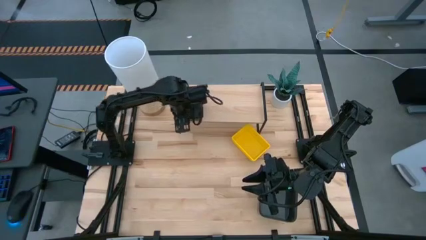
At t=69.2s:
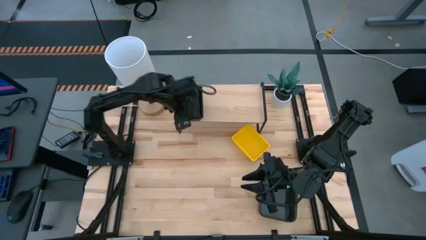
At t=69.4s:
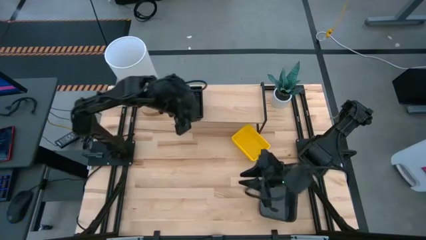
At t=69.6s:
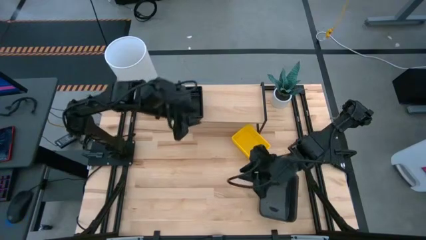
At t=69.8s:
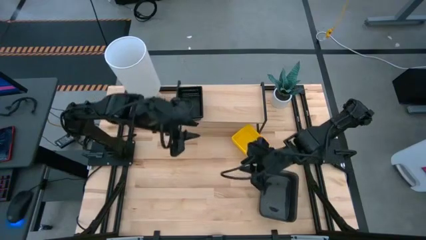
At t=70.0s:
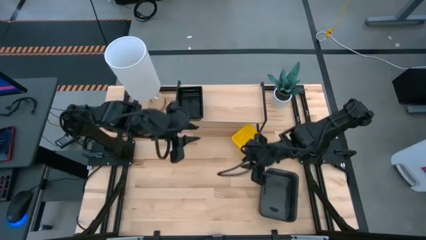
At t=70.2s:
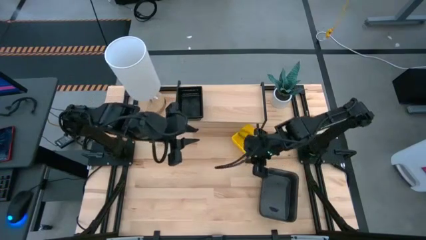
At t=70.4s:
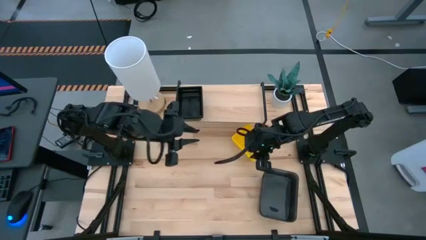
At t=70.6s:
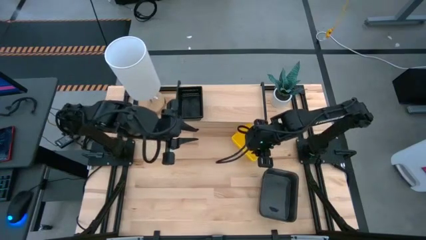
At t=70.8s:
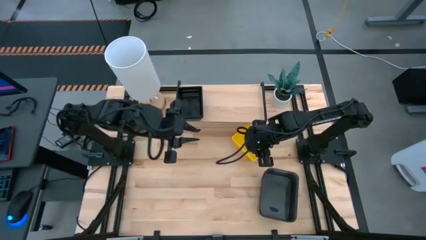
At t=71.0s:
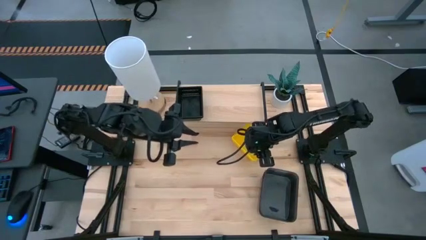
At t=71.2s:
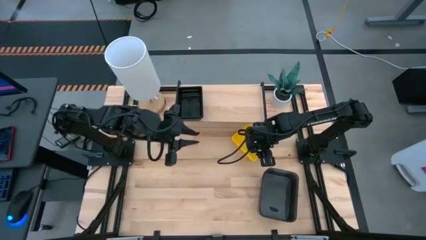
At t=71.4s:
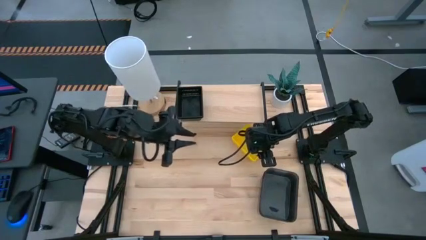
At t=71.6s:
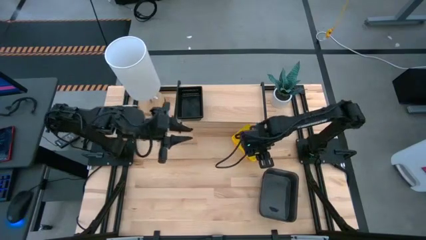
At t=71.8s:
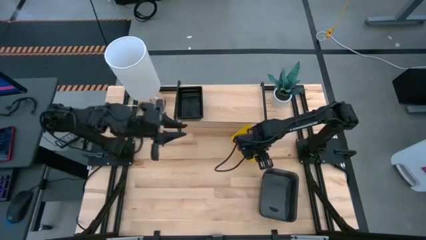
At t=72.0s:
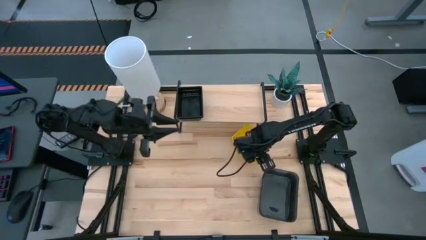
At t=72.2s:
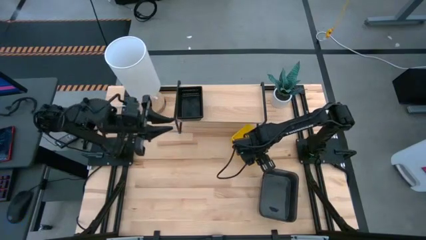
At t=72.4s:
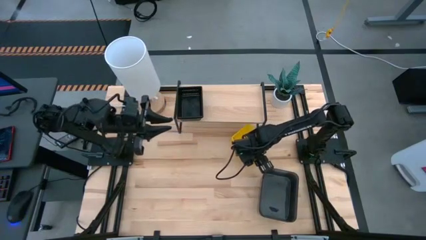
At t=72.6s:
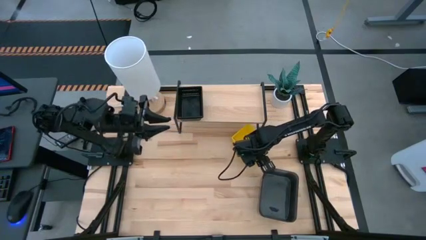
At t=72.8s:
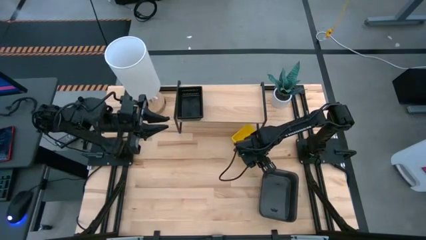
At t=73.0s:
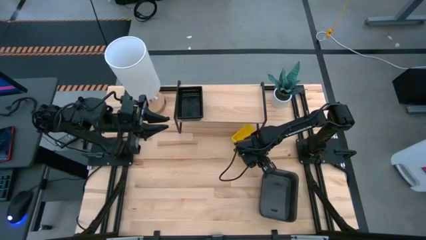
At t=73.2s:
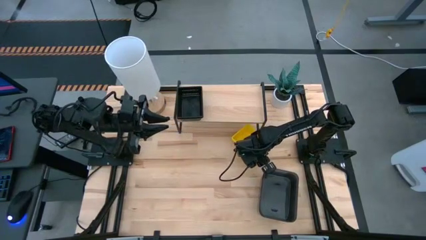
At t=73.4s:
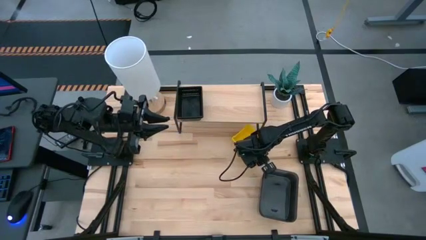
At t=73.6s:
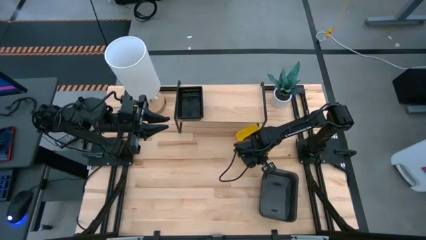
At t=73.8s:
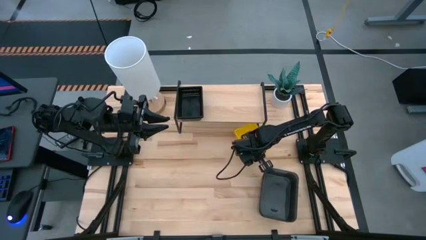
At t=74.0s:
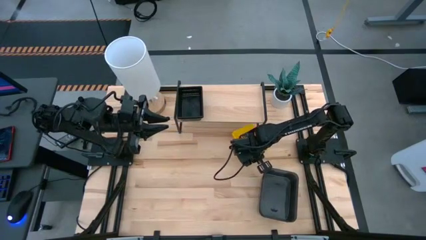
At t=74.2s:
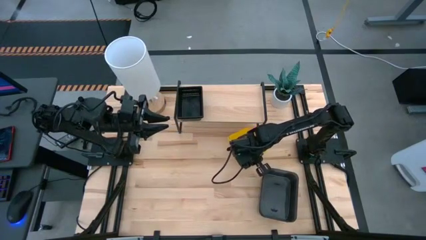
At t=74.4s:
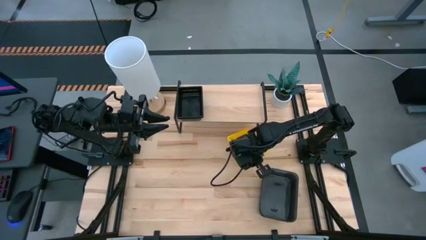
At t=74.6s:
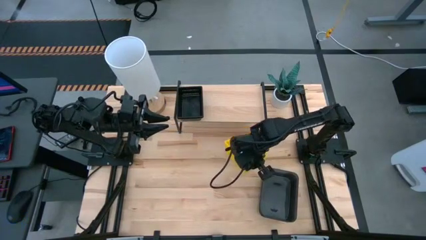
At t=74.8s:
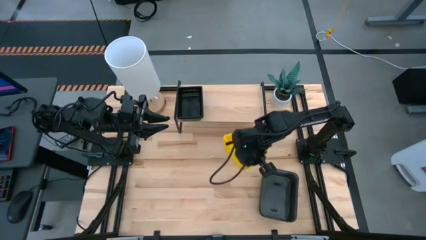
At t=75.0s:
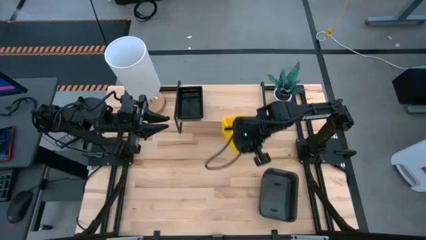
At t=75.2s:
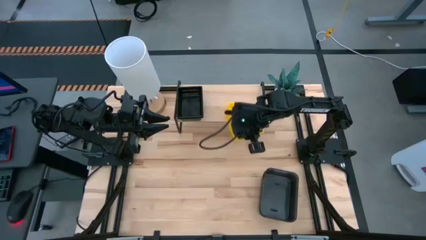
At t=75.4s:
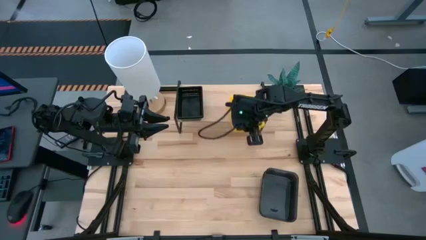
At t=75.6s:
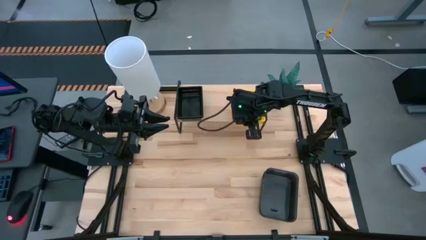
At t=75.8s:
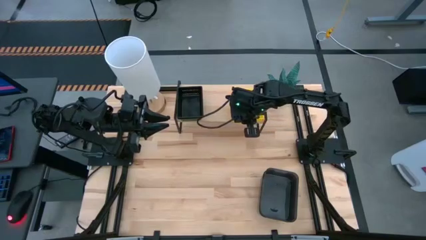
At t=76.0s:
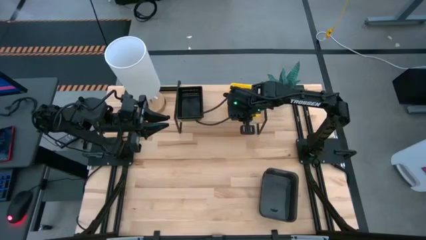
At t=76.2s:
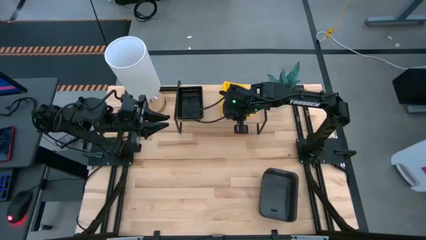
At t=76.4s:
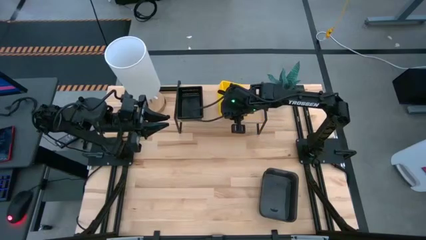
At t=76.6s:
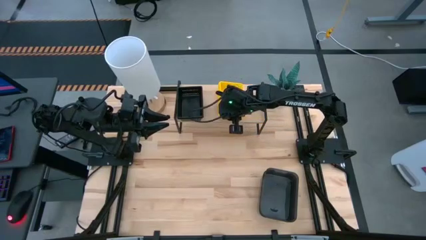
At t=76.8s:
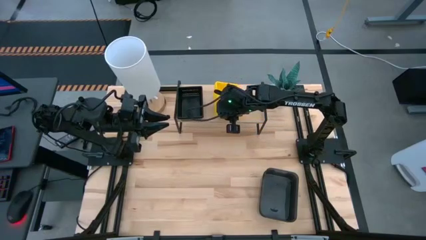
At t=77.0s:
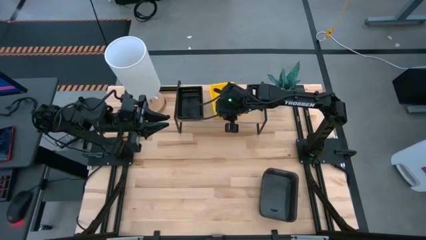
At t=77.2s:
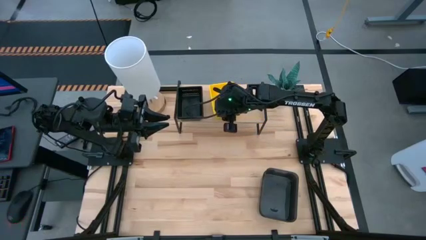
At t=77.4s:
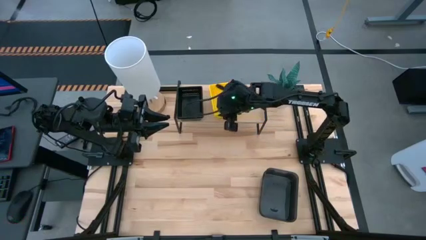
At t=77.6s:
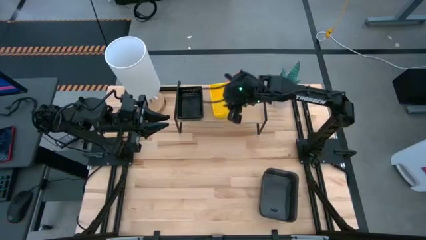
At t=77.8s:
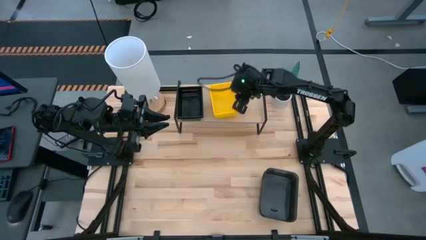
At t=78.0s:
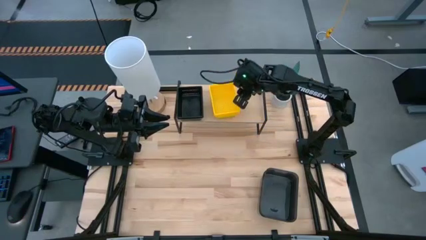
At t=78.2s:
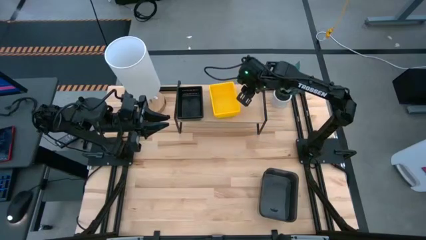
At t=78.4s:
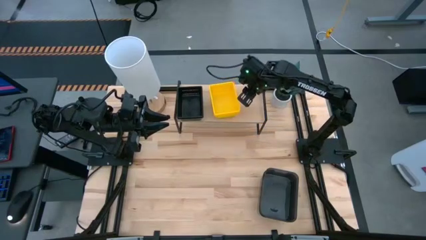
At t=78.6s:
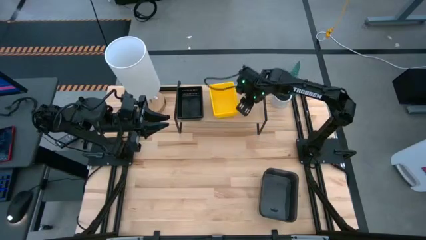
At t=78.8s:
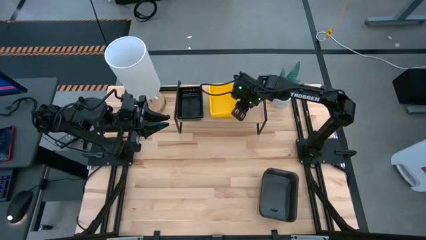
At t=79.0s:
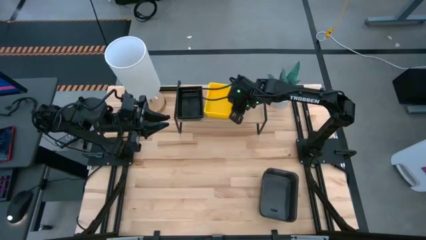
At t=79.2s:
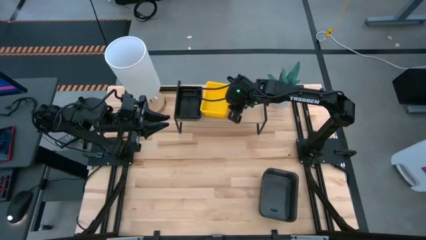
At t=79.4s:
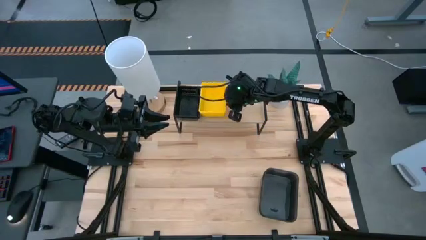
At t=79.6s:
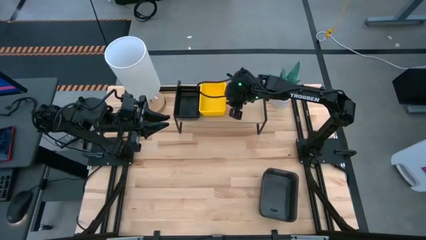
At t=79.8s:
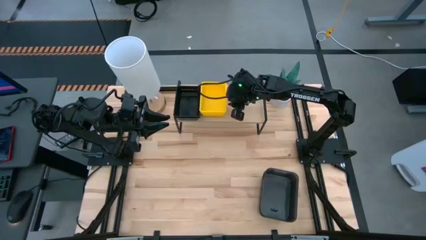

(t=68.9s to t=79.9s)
Task: Stack baskets on shelf by color
Put the stacked yellow bin on the shelf

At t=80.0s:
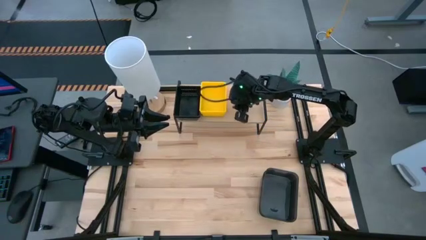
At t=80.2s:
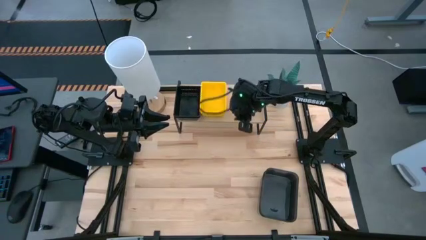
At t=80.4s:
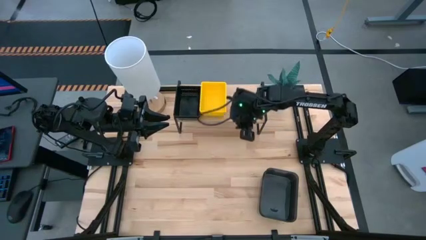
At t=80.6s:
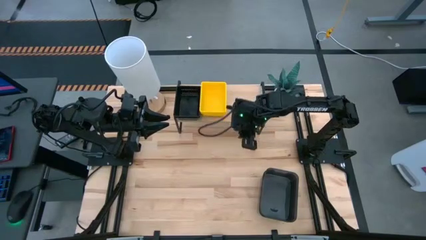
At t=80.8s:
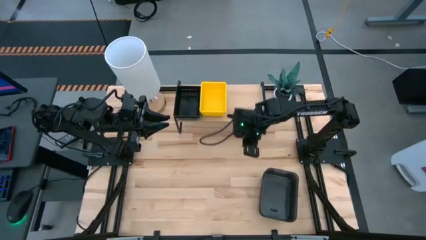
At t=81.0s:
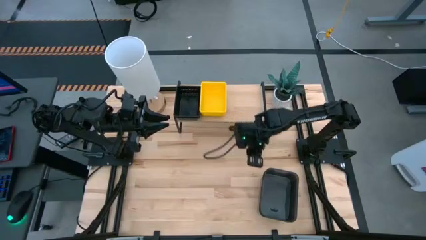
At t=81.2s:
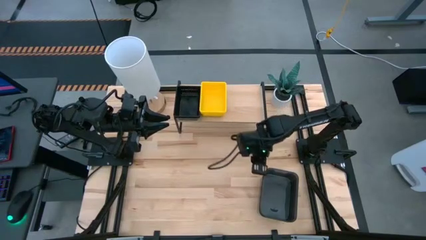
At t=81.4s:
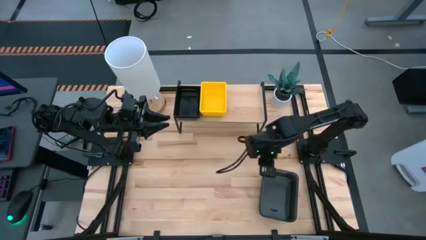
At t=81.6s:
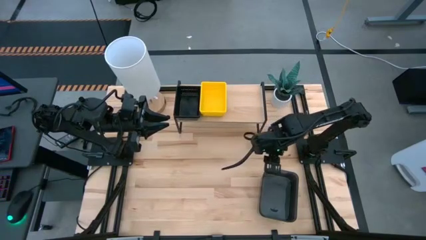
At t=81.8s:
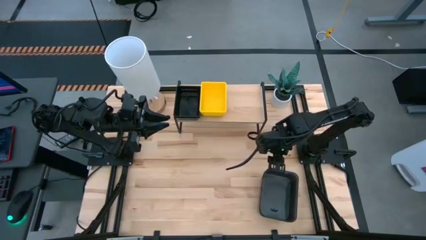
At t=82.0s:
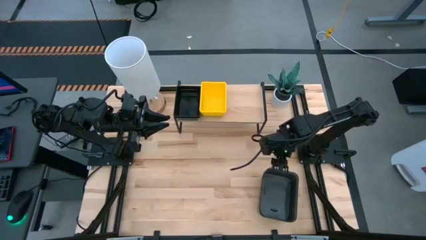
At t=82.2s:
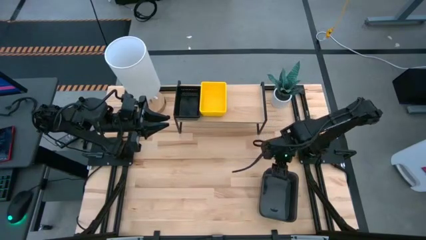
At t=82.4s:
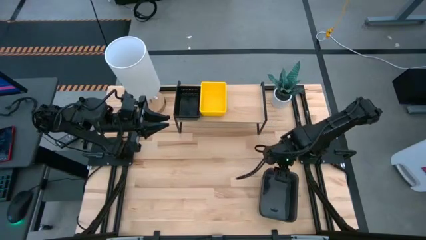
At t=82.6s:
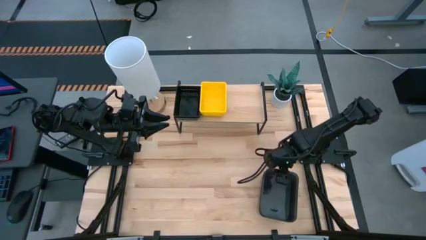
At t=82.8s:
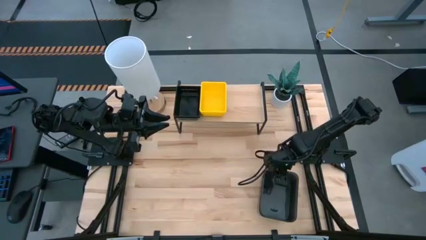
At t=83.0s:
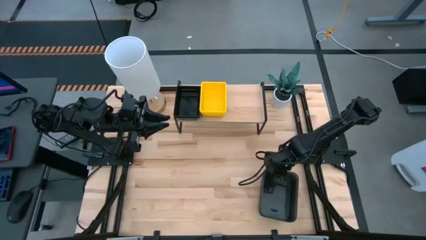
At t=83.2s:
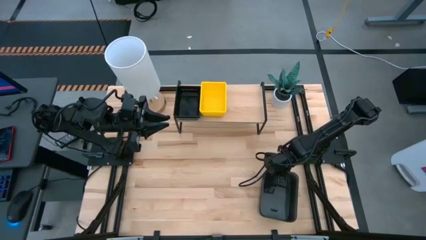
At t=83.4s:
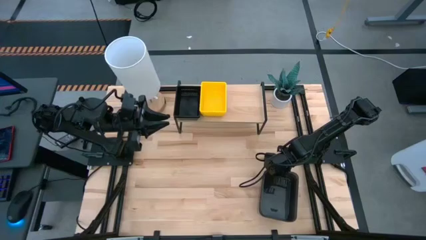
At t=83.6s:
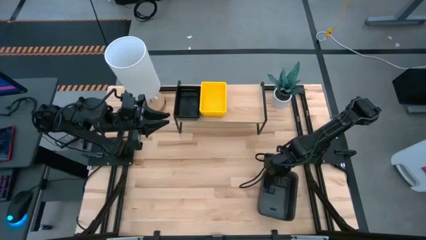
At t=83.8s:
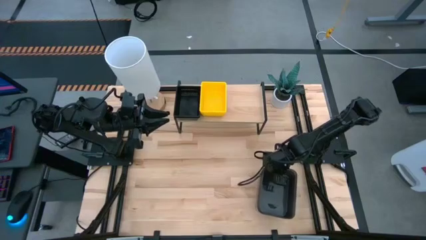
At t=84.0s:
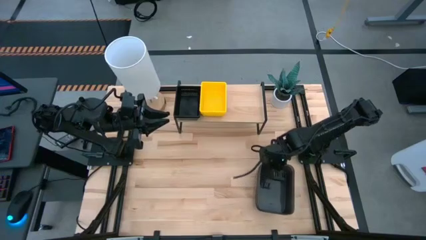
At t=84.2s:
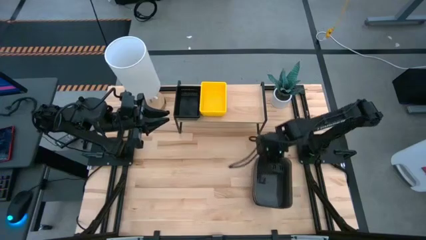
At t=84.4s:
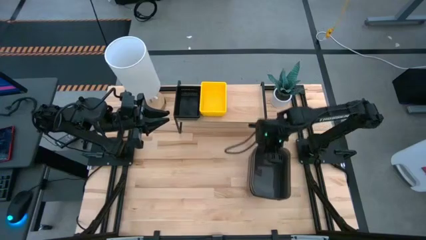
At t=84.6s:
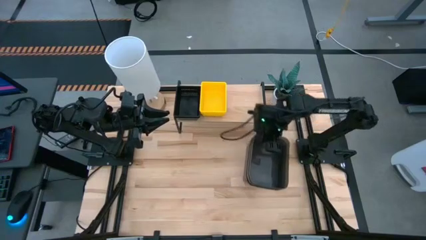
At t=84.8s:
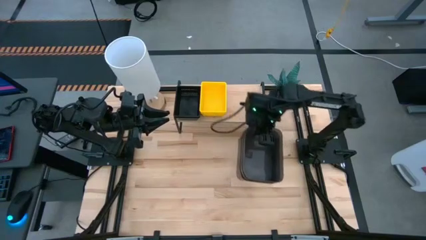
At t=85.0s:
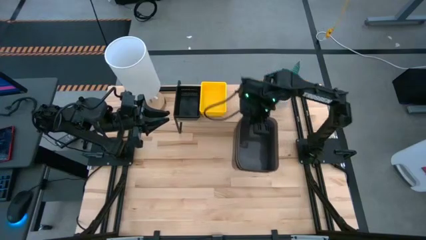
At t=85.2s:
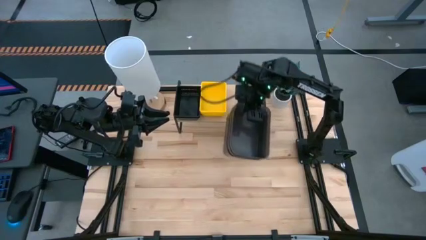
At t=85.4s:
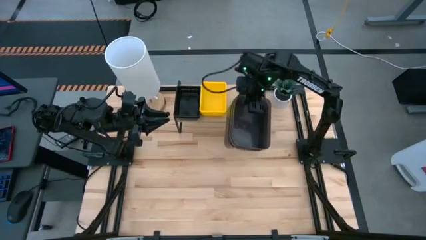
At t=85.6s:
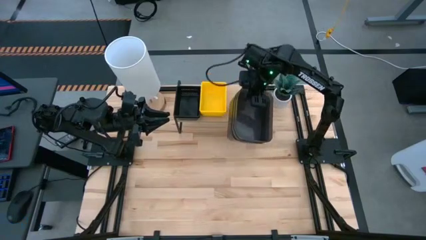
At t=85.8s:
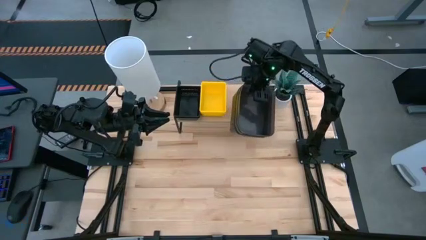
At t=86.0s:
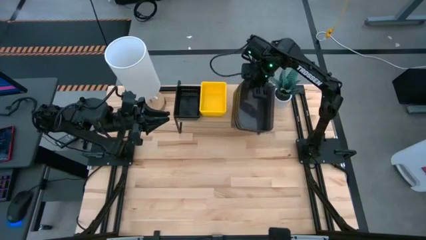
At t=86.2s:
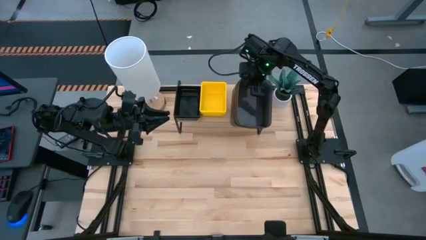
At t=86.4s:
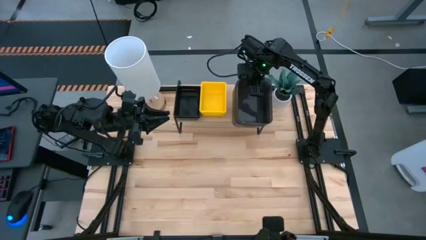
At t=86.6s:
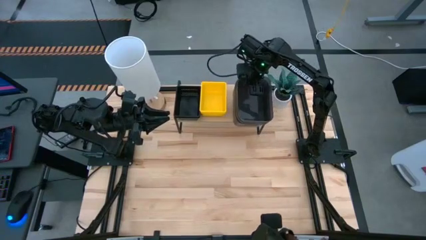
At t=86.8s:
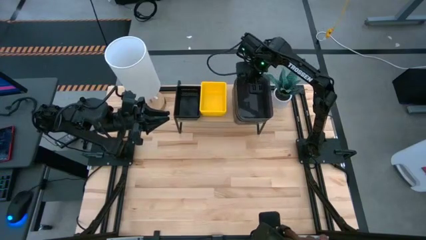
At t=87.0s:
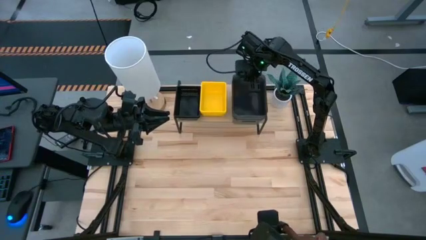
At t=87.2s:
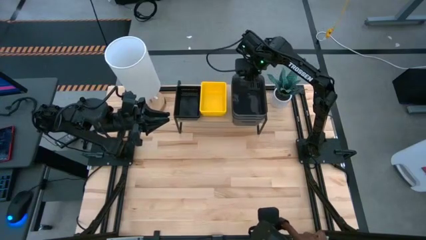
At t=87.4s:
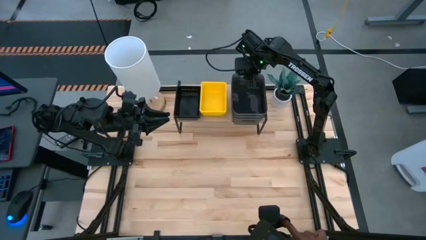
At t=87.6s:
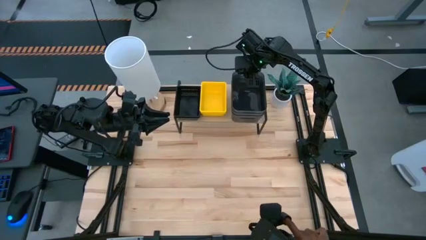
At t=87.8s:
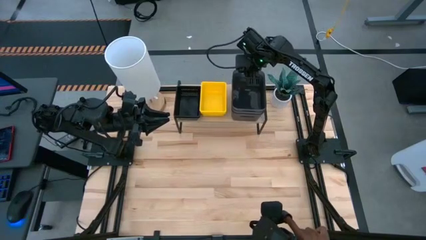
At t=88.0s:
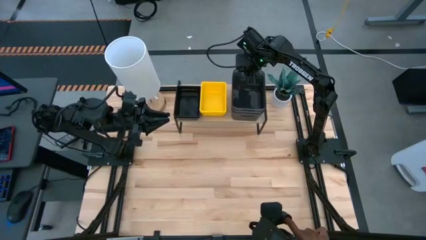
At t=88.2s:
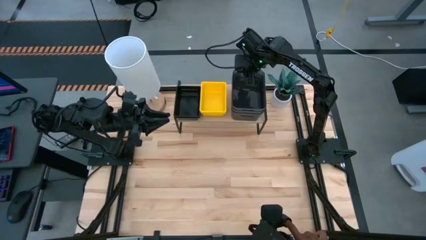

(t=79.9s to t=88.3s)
Put the stacked gray bin on the shelf
